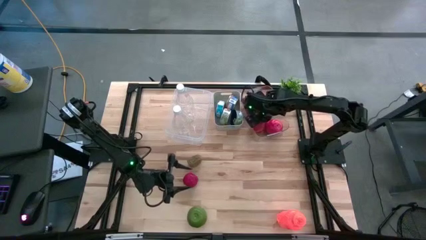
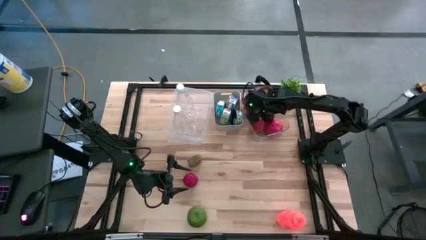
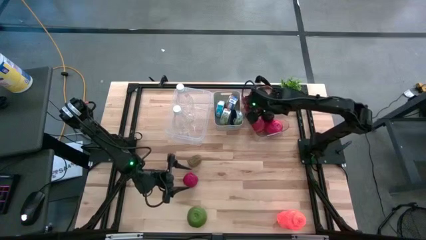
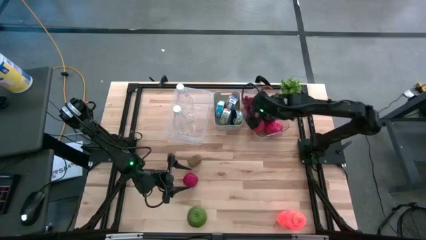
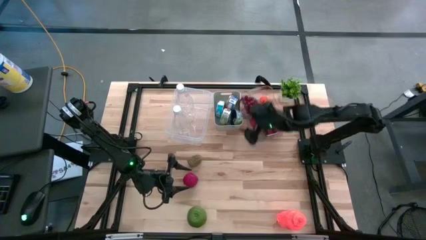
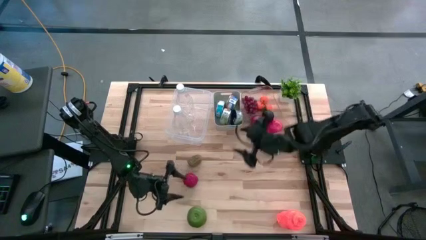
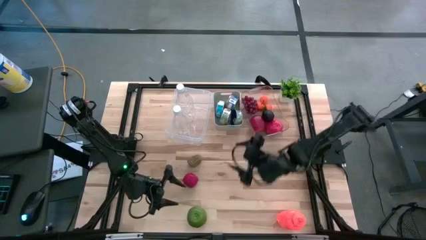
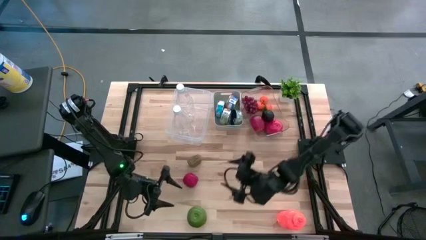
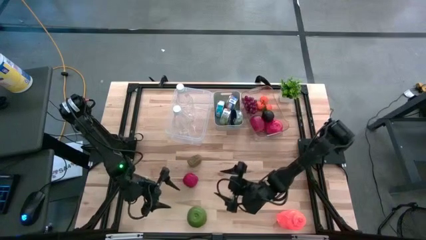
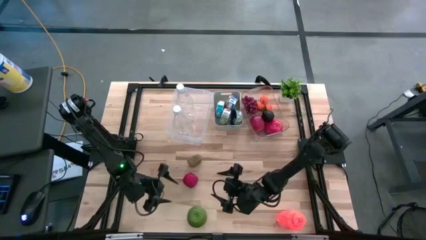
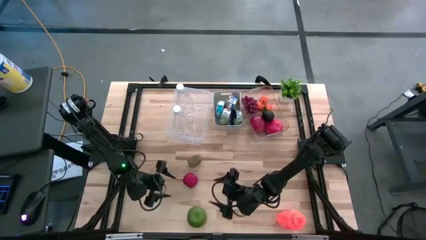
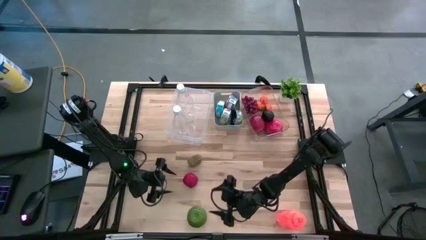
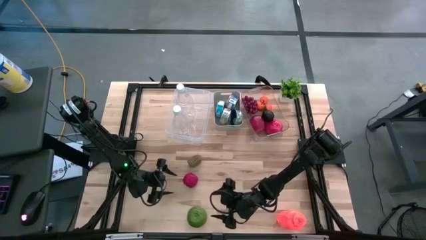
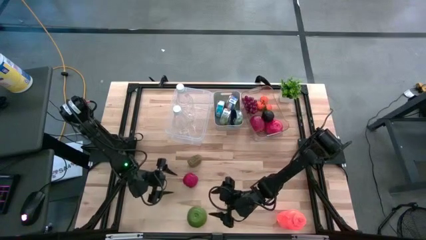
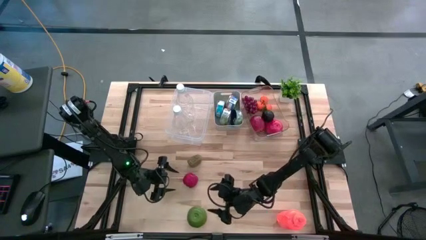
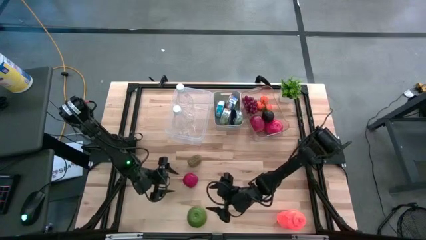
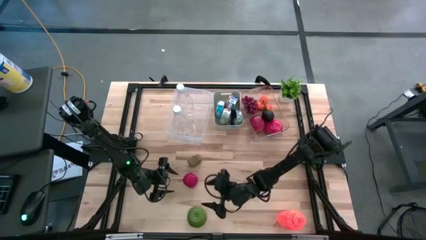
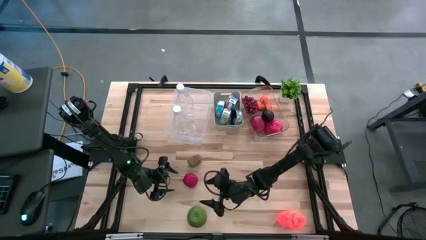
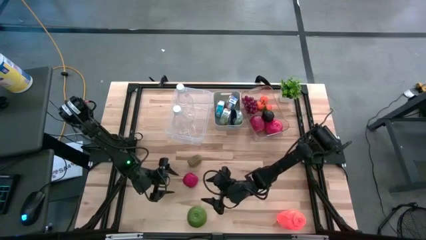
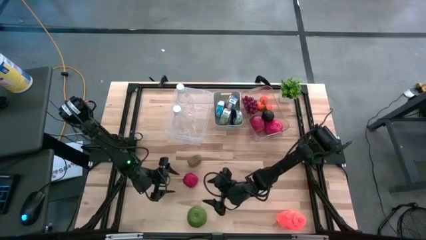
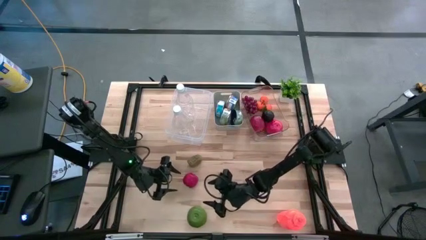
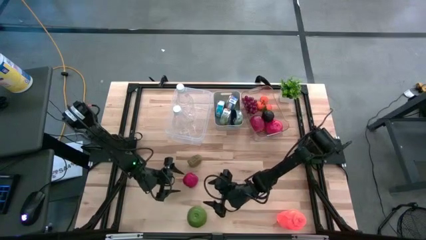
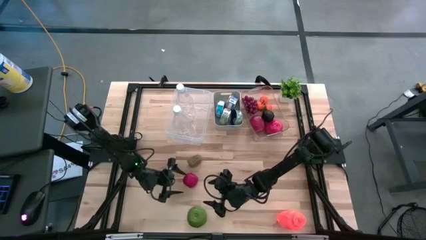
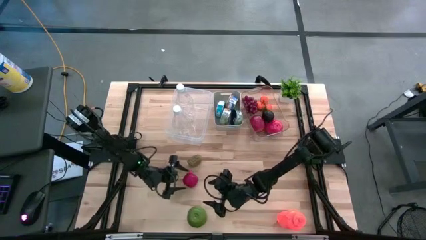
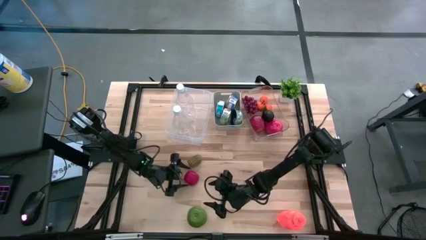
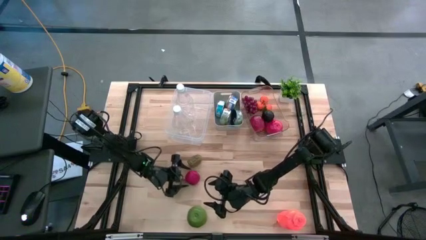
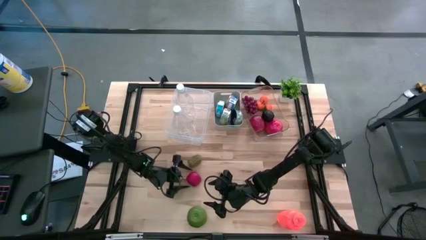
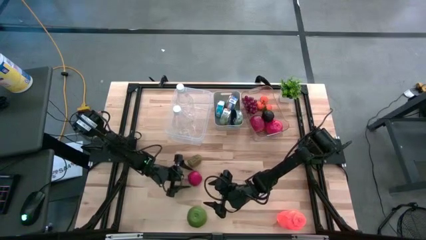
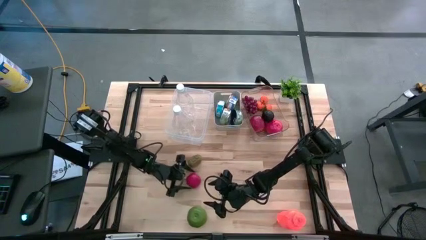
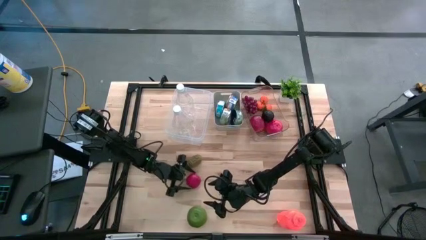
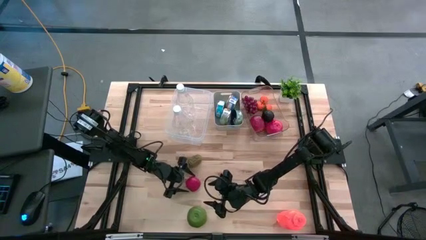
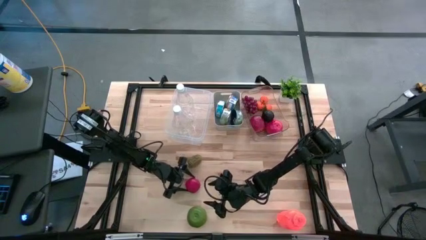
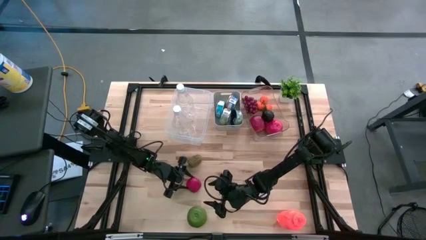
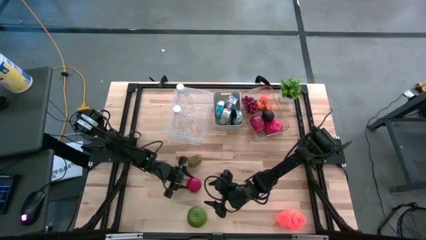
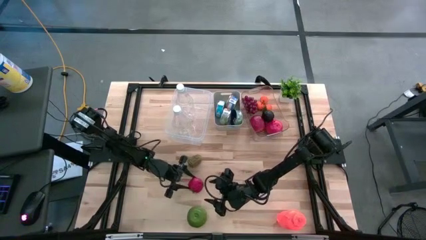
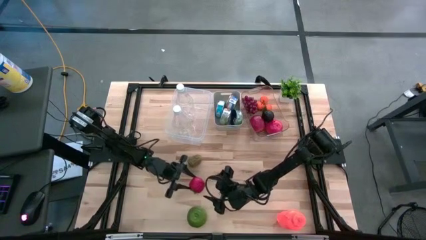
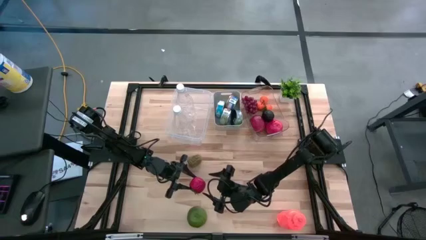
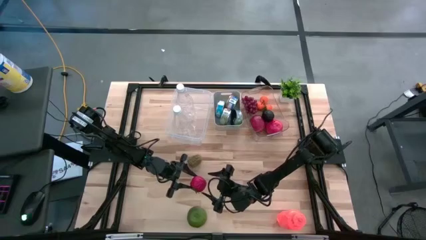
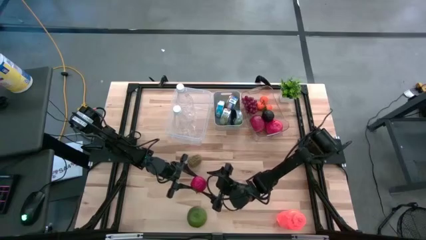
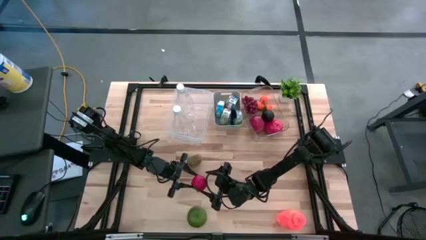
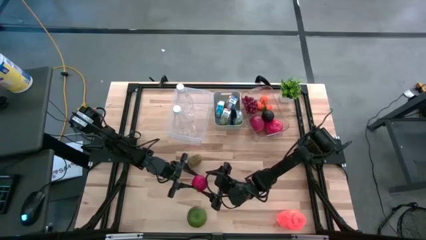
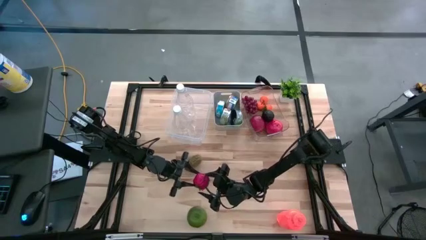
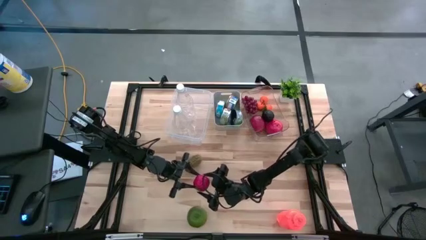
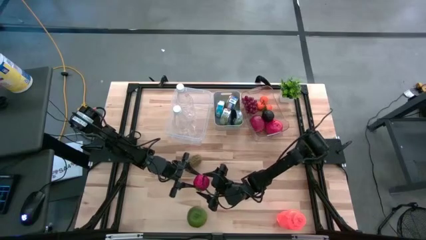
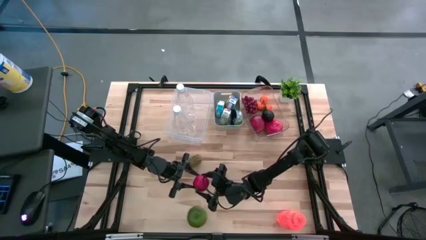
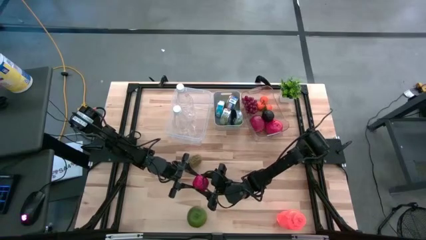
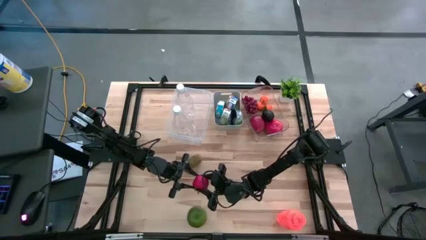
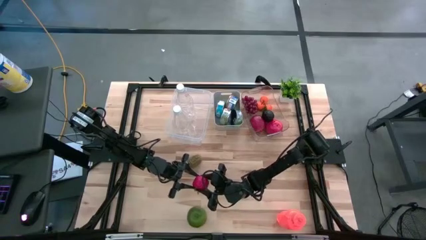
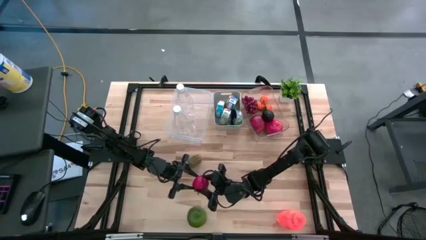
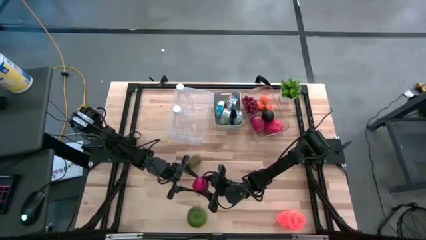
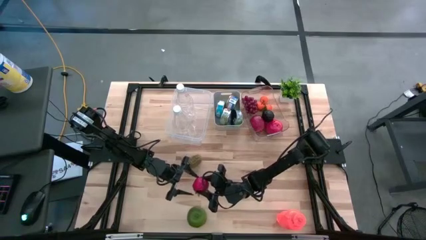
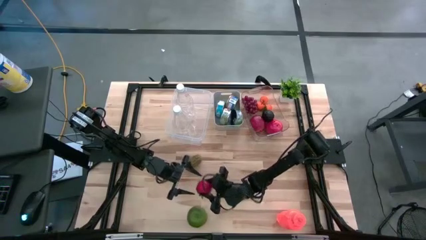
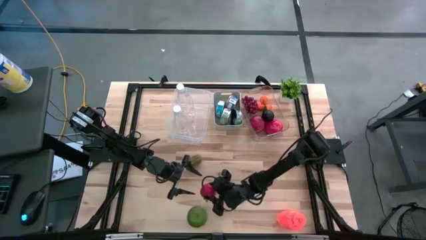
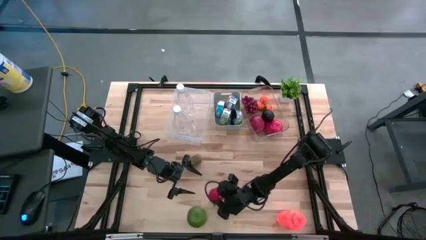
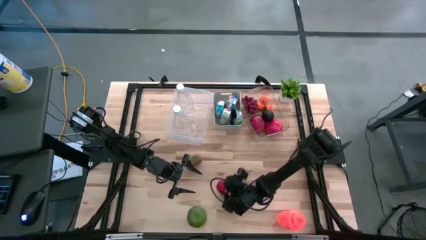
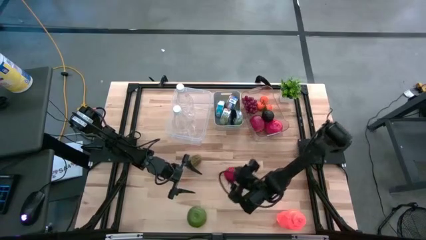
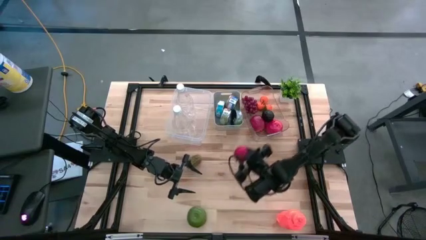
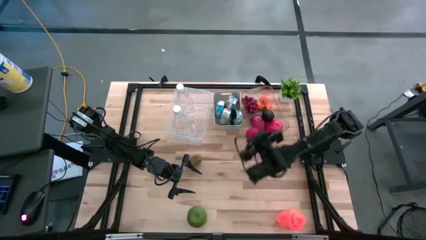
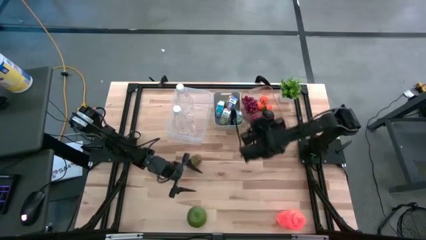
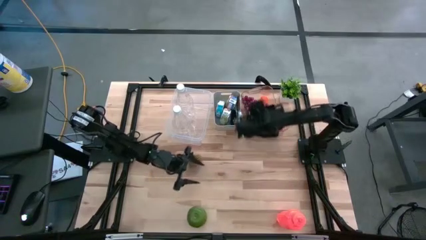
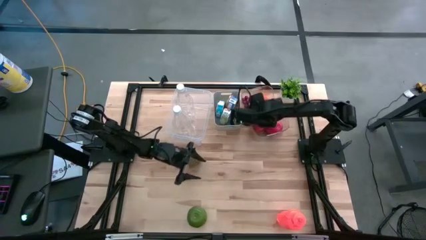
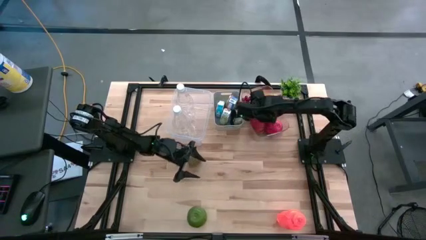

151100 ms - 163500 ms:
Task: Pick & Place Food Item
Put the tomato into the right transparent bin

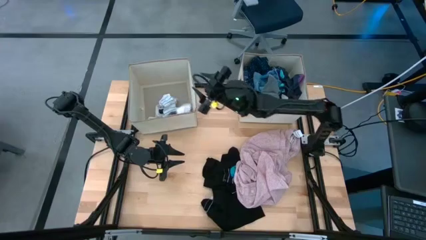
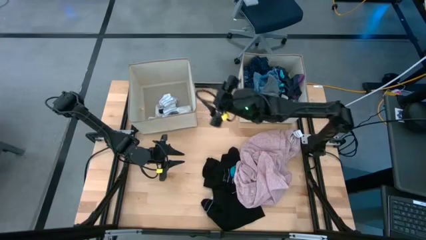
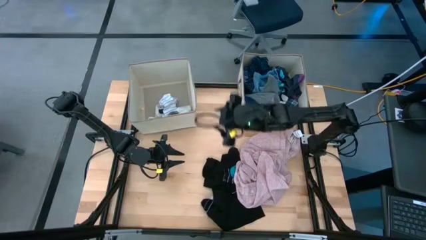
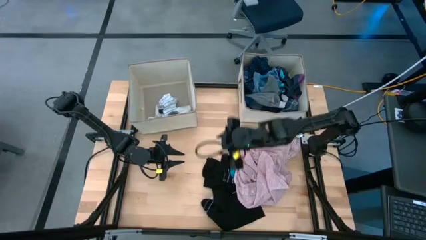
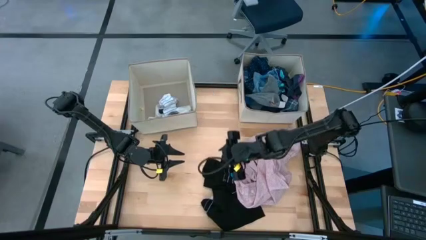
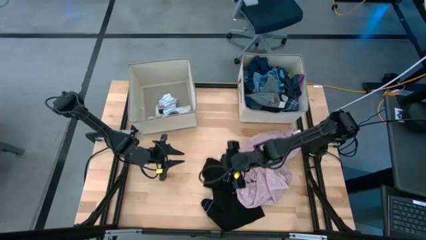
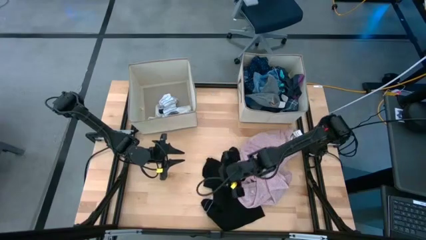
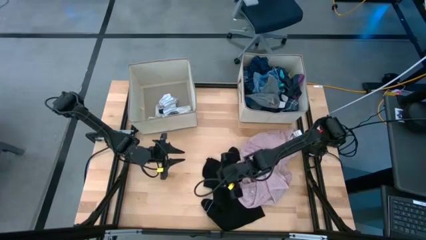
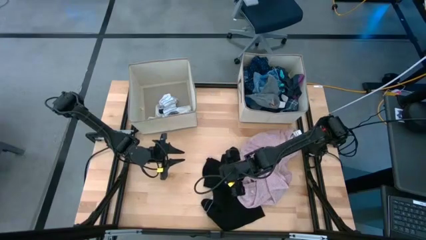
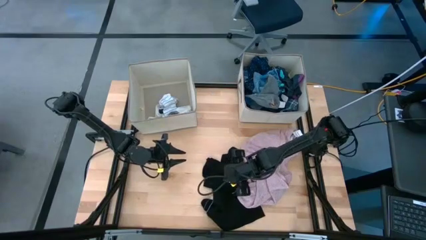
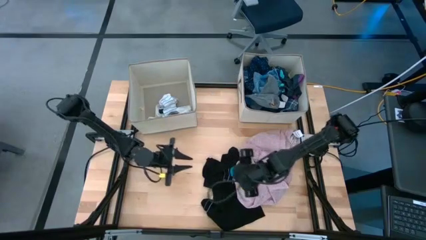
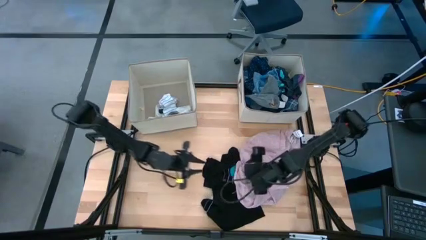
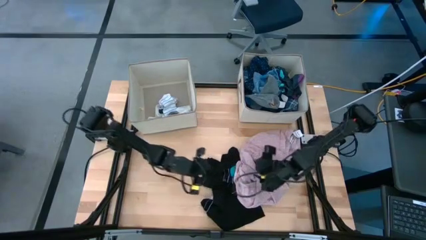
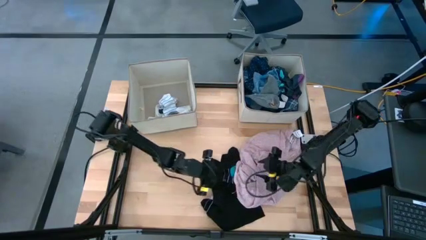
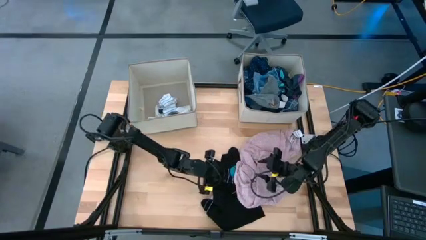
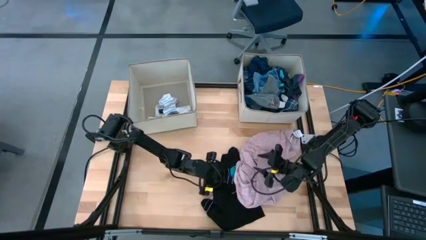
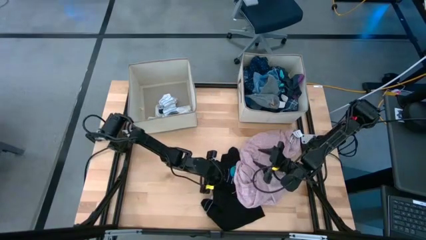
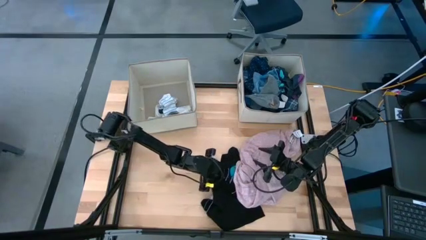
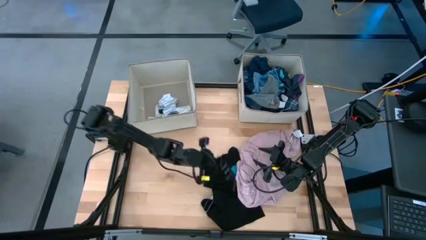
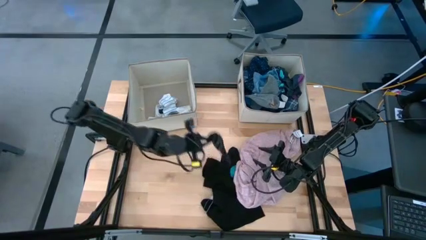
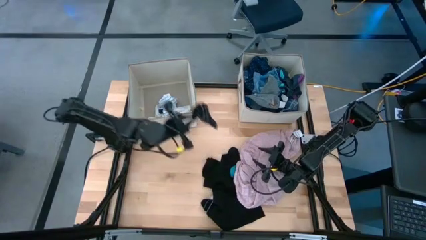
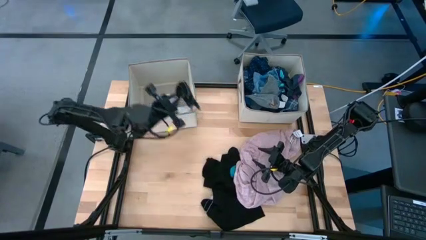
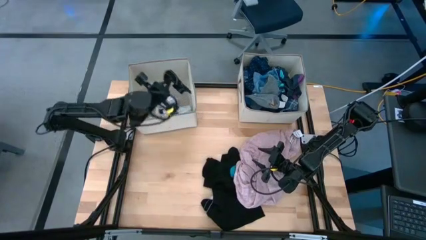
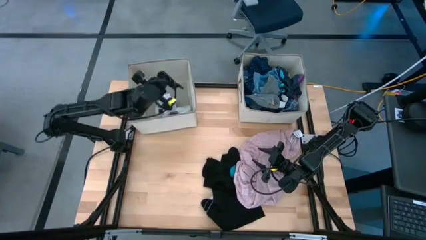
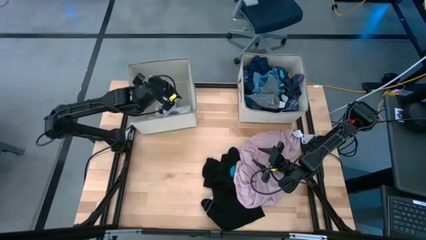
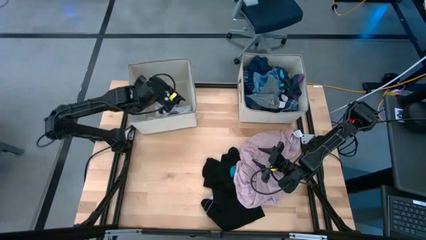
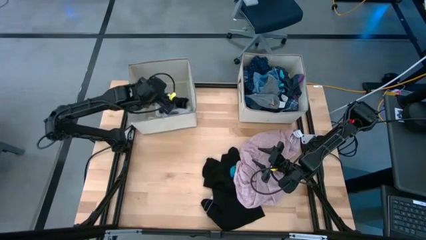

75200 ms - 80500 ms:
Task: Sort clothes
Put the black sock into the left laundry bin
